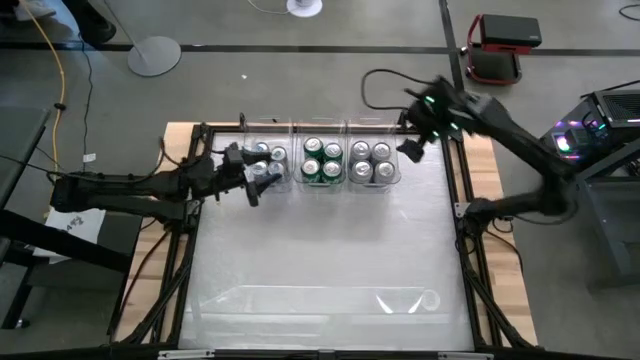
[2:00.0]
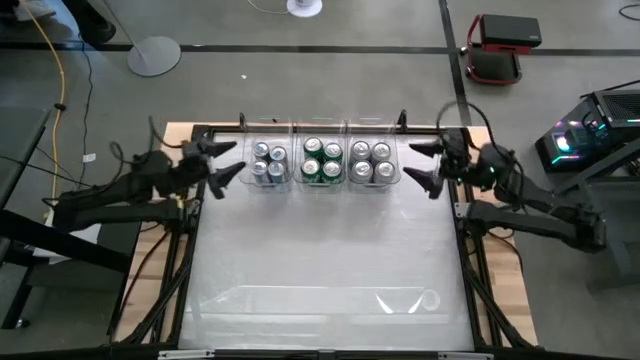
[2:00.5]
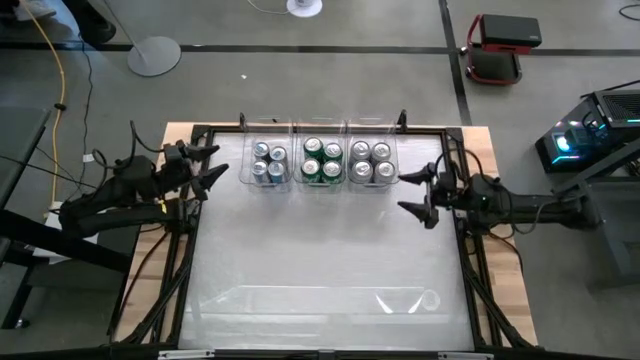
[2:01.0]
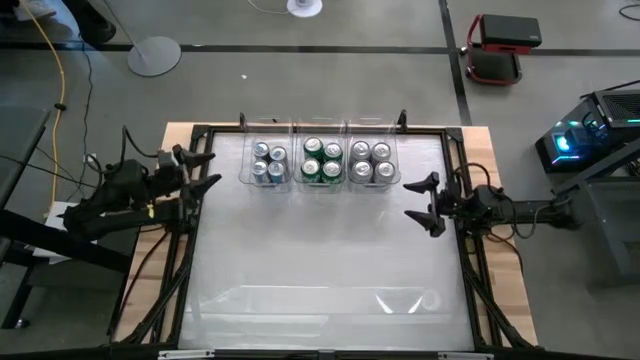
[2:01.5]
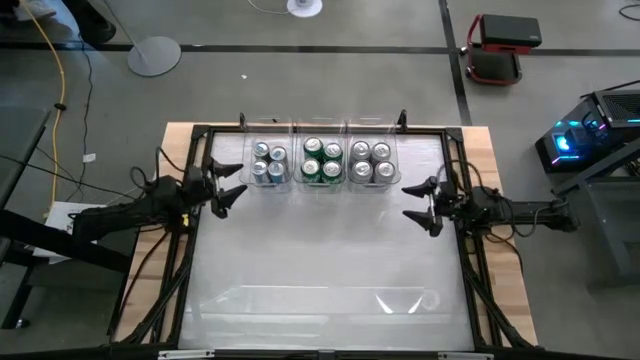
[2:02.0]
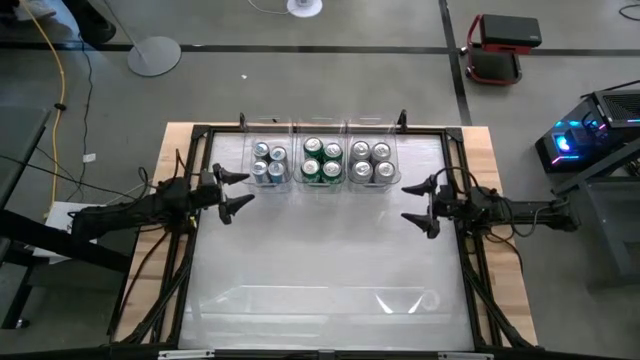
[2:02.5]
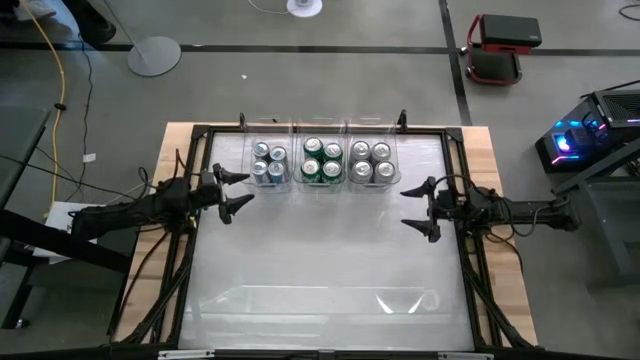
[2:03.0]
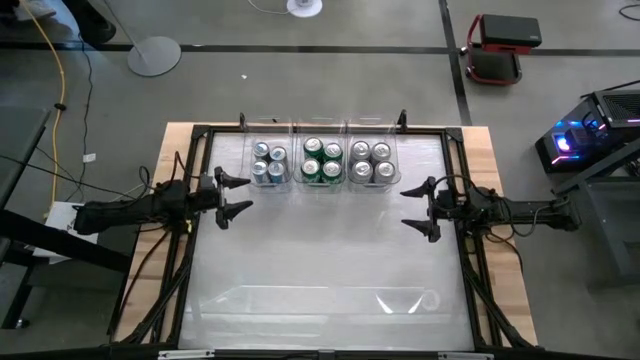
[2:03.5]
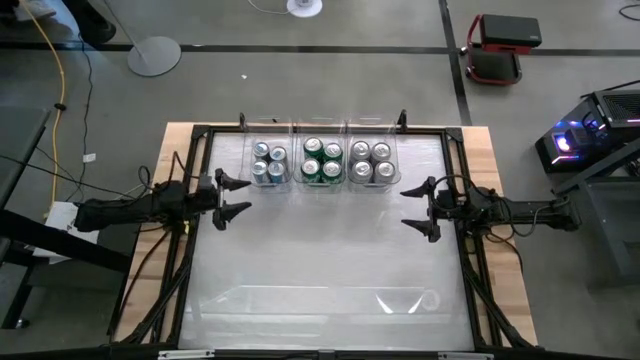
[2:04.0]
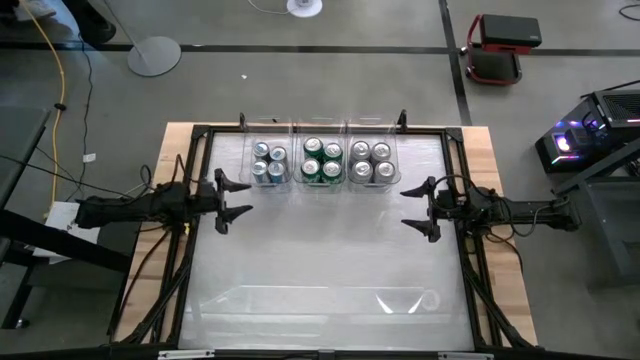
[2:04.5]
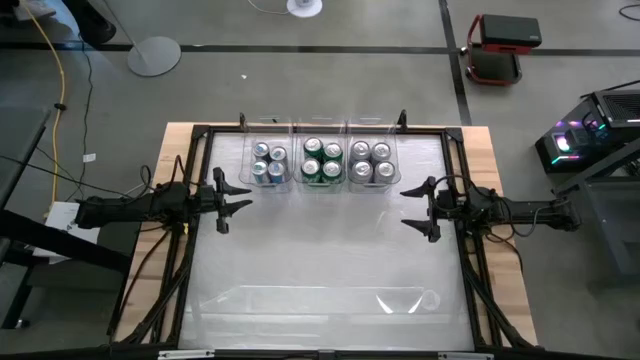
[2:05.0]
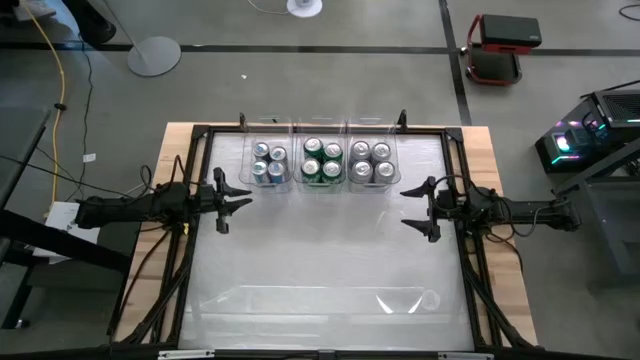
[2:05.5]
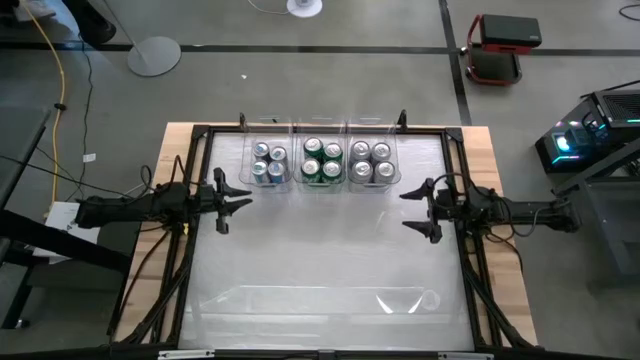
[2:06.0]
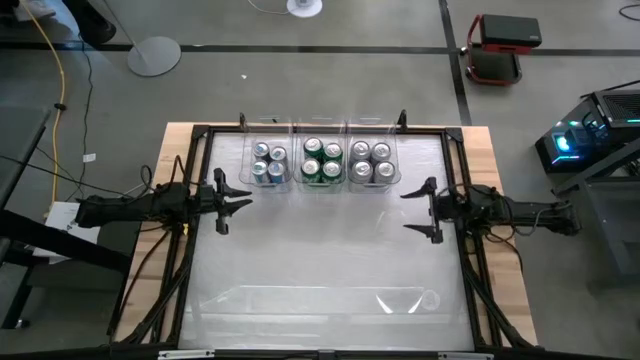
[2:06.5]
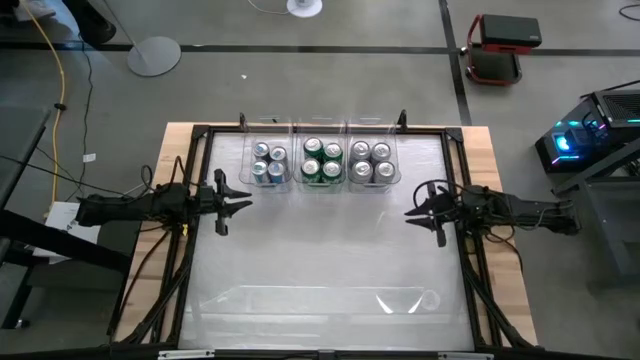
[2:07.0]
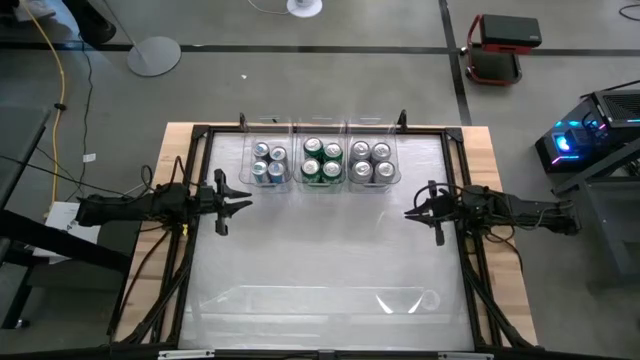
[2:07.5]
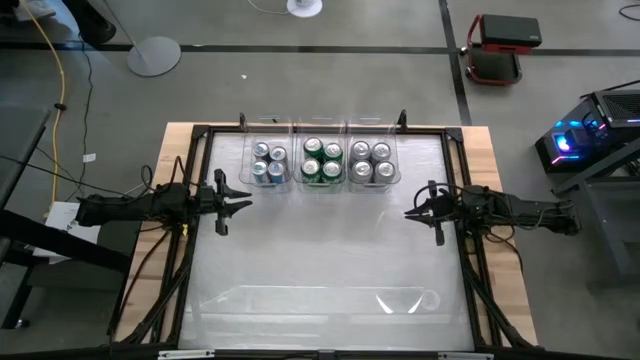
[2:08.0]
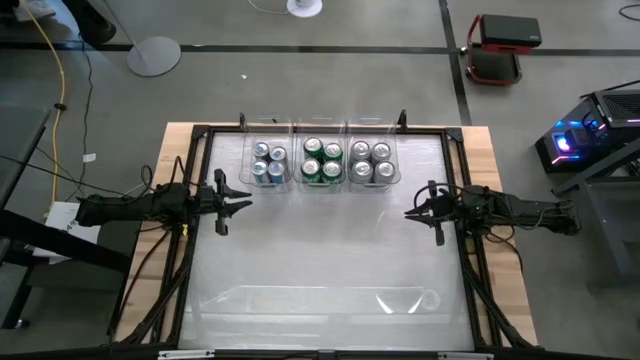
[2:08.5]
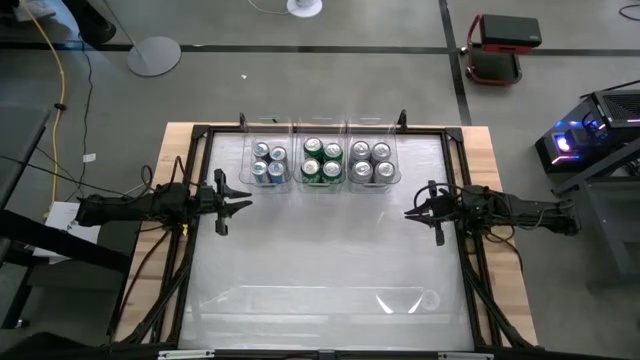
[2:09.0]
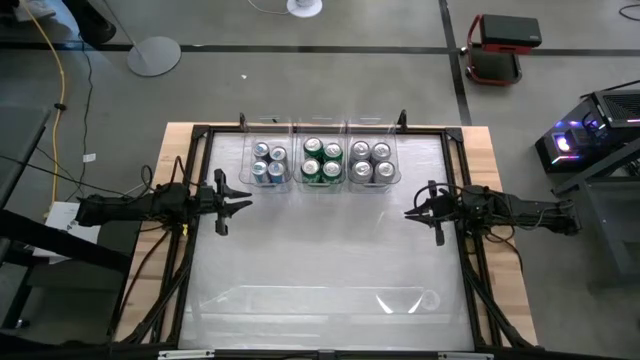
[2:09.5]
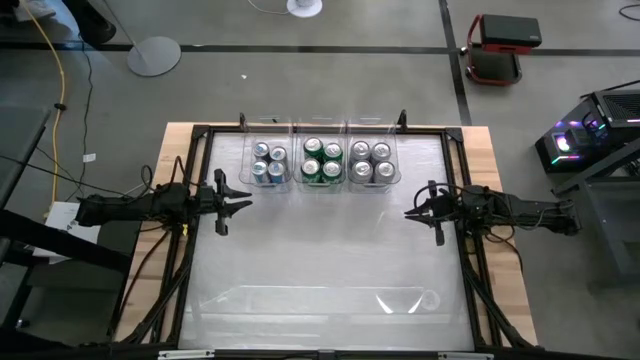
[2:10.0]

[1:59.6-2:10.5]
Task: Sort soda cans
Return to Home Position

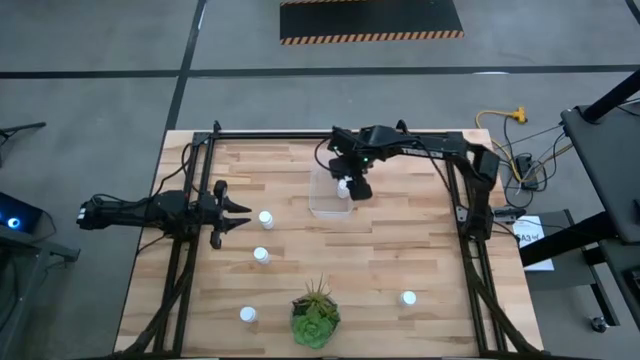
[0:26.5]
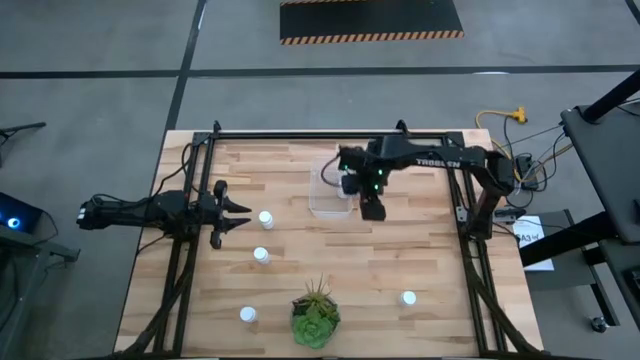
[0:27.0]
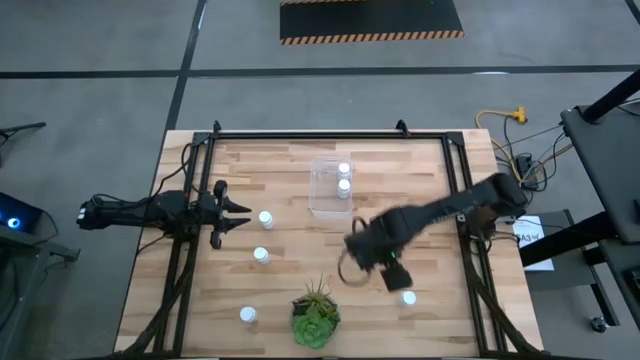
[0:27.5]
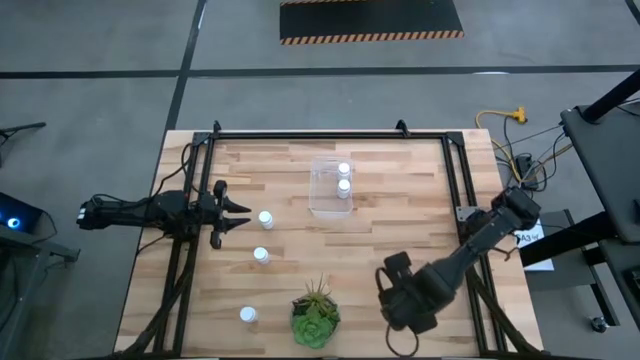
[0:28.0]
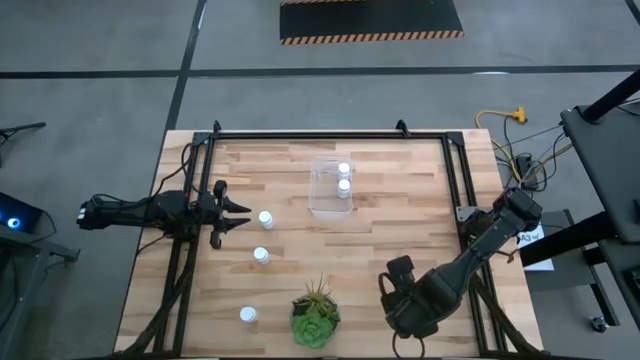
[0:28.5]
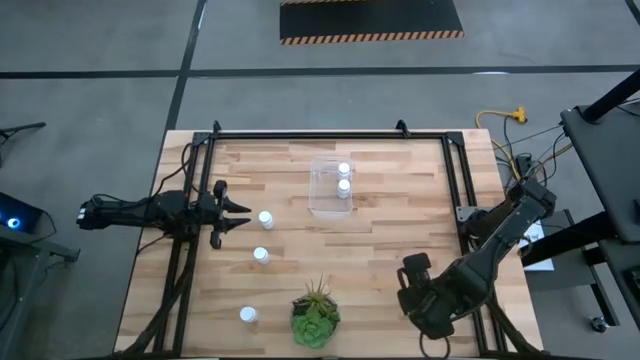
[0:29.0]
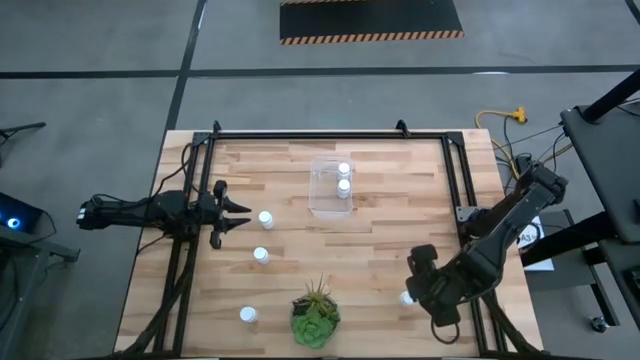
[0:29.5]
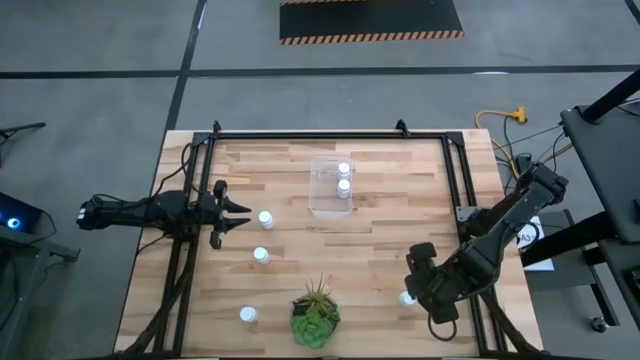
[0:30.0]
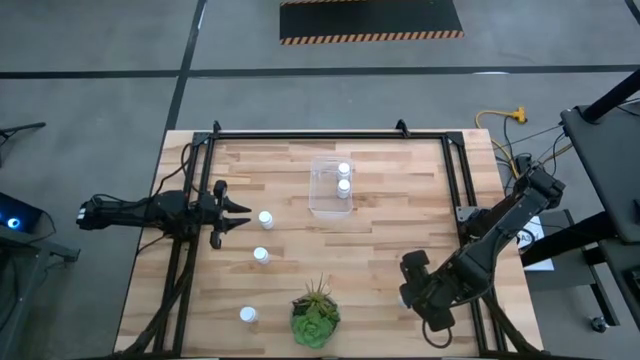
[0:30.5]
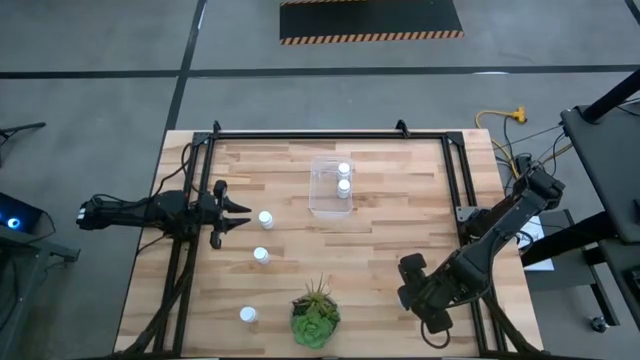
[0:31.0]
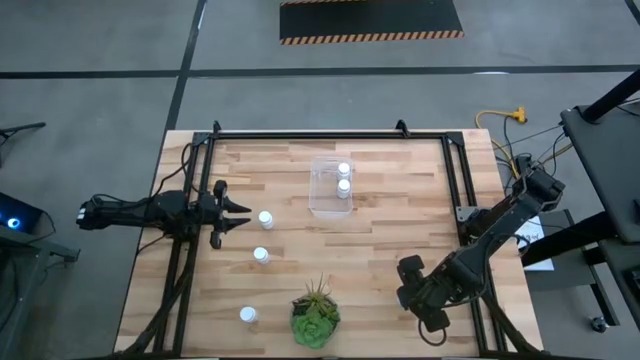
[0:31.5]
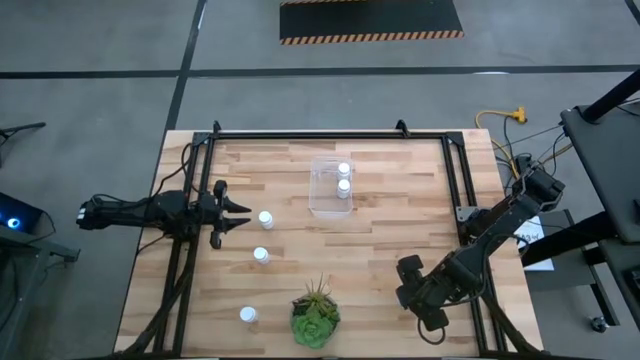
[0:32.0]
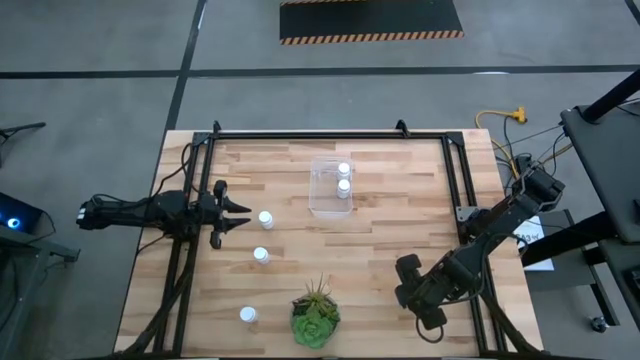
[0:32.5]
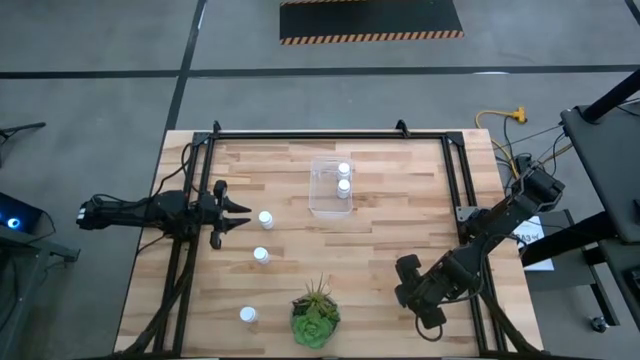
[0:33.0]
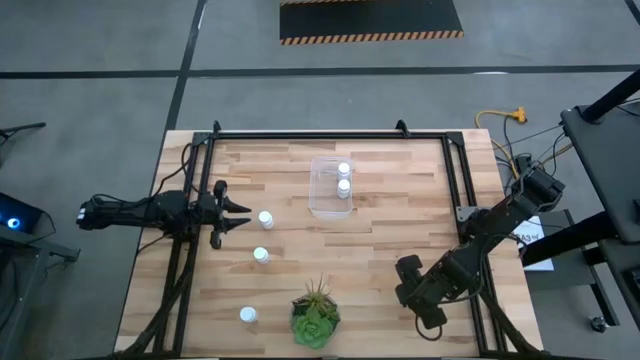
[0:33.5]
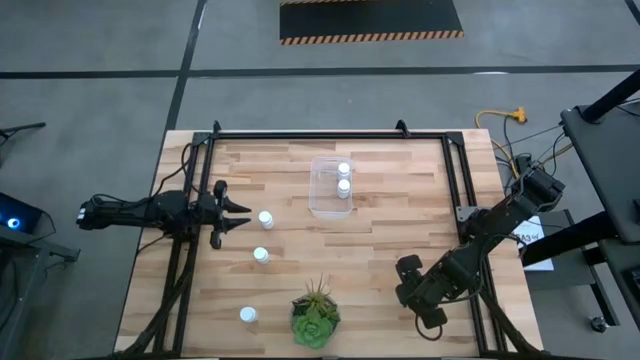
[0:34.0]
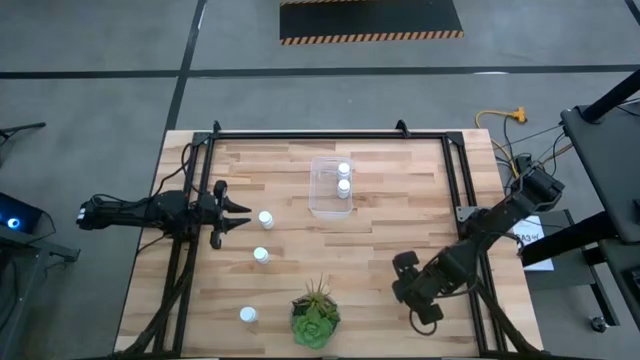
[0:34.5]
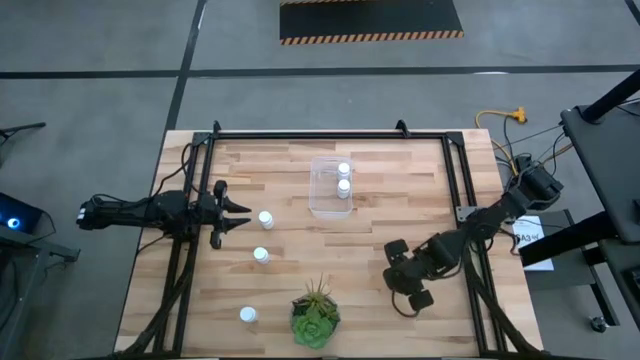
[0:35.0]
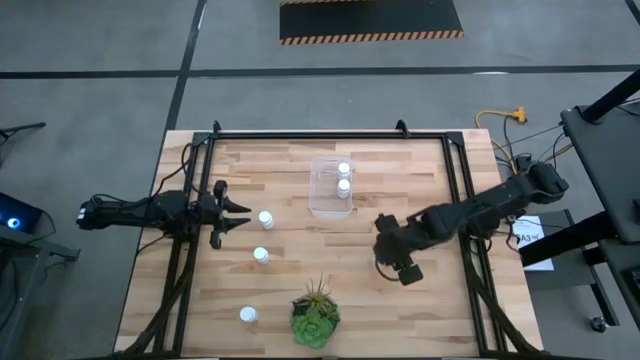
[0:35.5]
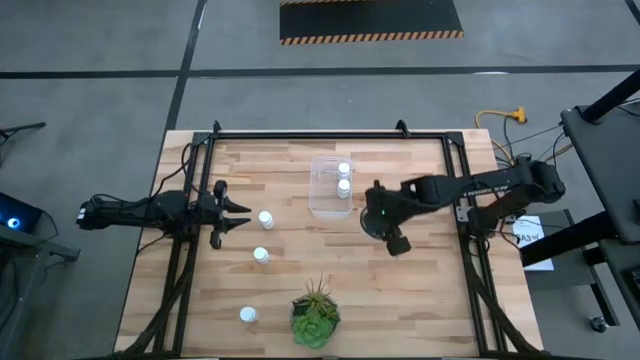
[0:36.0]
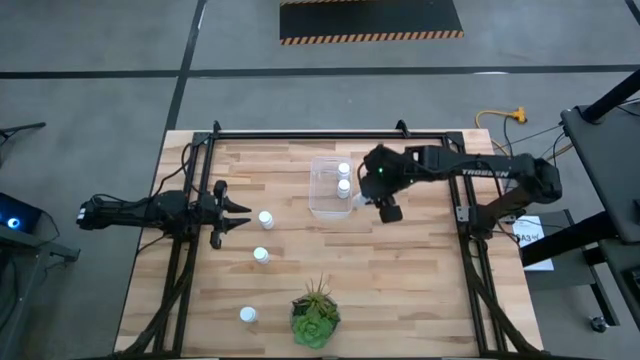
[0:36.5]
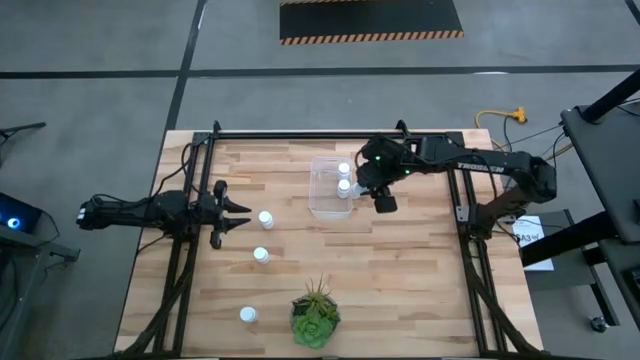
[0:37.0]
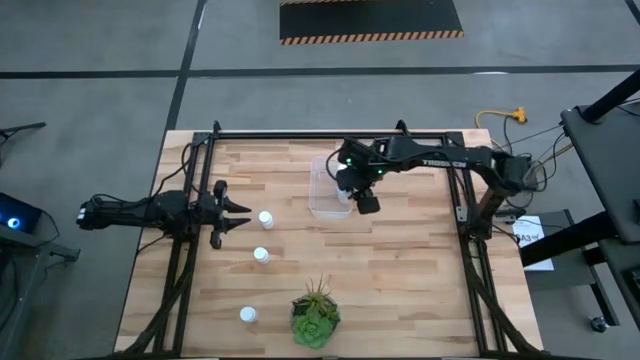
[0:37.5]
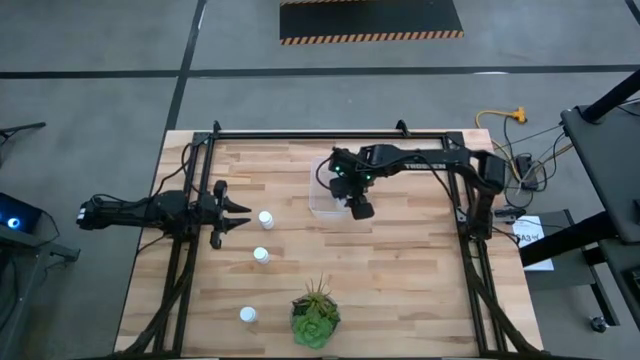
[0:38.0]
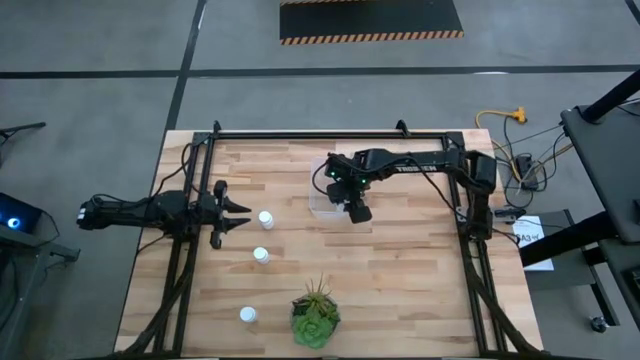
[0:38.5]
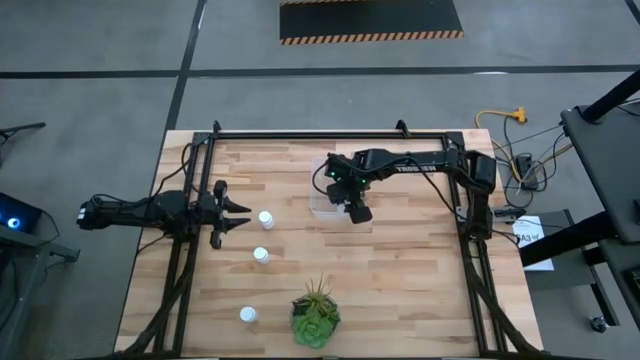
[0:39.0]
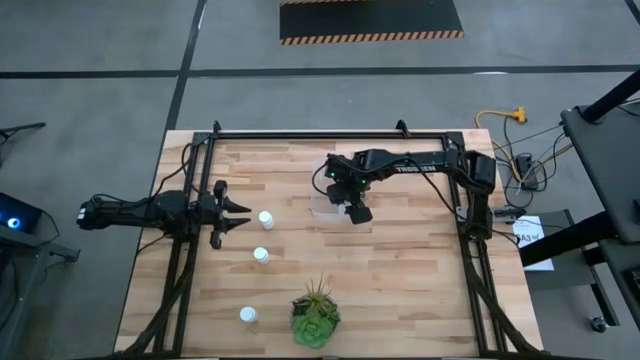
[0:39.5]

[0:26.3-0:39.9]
Task: Pick and place pill bottles into a basket
Put the white pill bottle into the transparent bin
